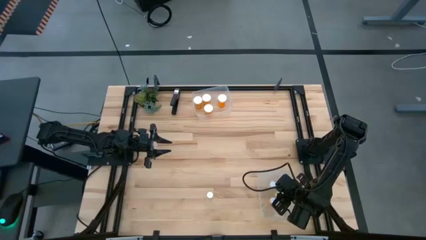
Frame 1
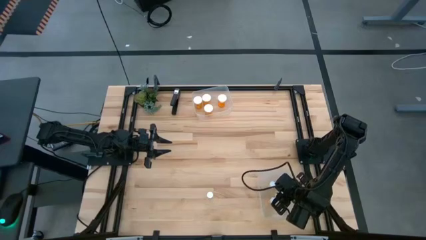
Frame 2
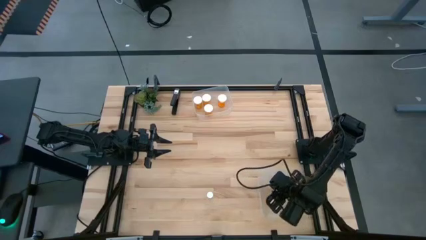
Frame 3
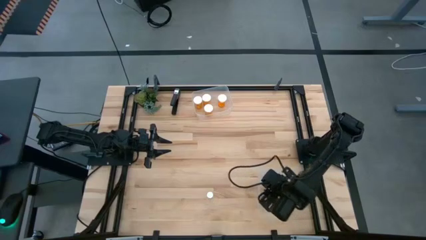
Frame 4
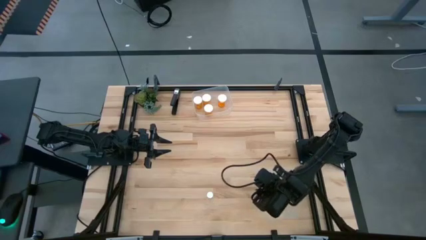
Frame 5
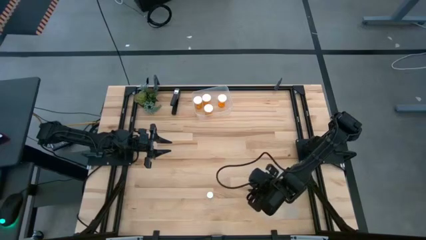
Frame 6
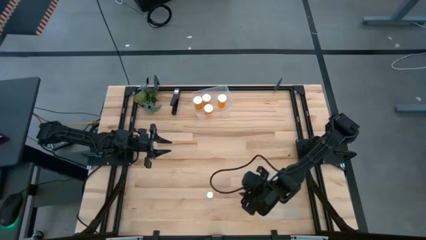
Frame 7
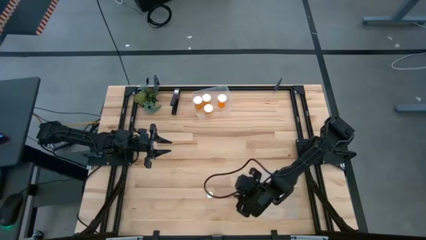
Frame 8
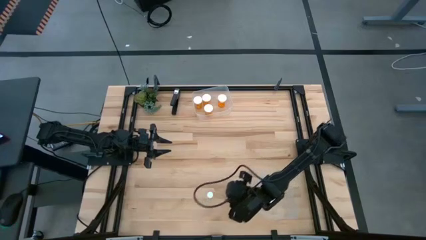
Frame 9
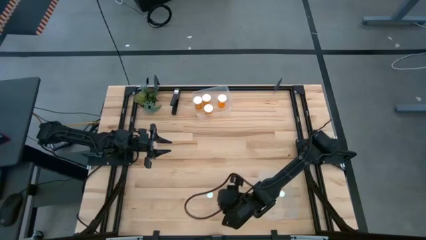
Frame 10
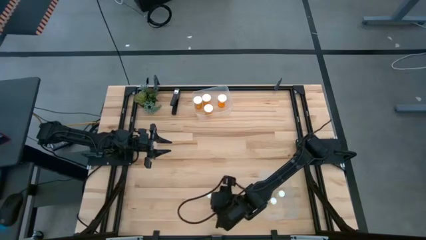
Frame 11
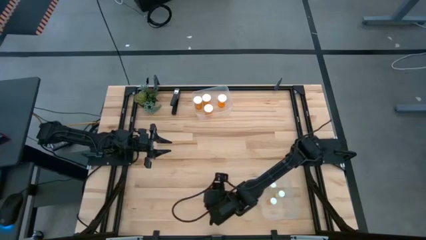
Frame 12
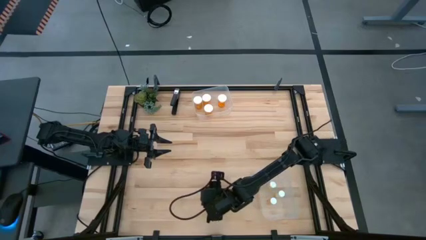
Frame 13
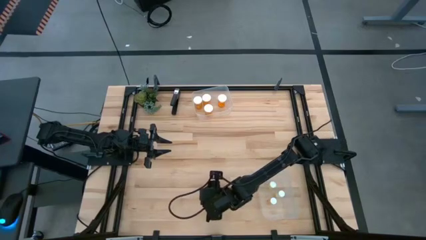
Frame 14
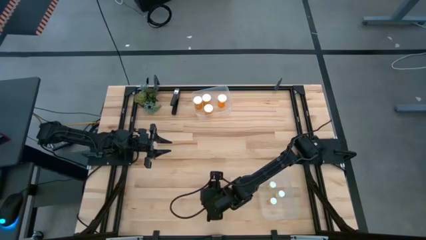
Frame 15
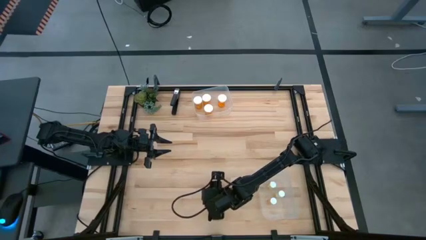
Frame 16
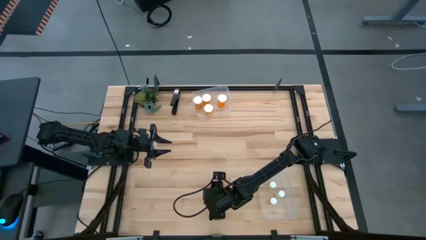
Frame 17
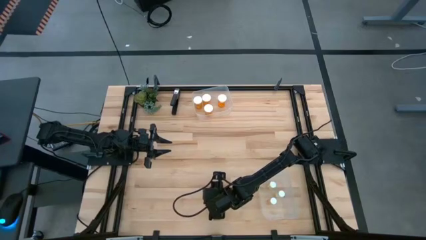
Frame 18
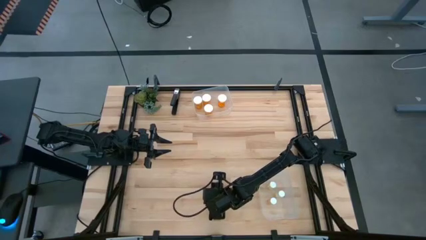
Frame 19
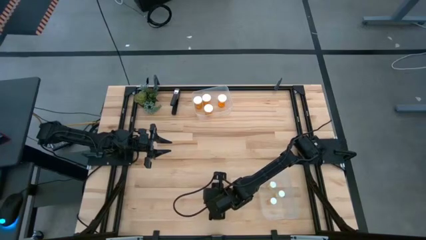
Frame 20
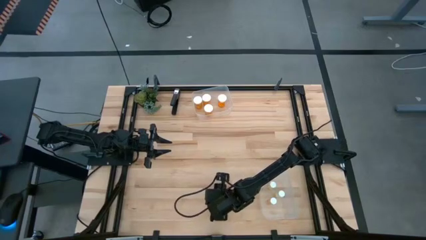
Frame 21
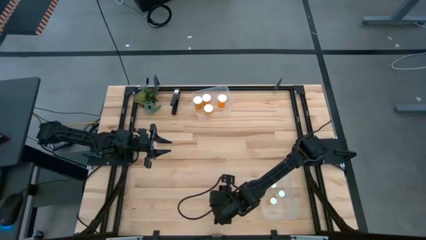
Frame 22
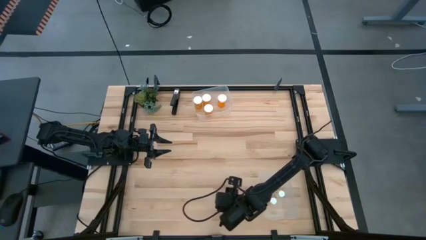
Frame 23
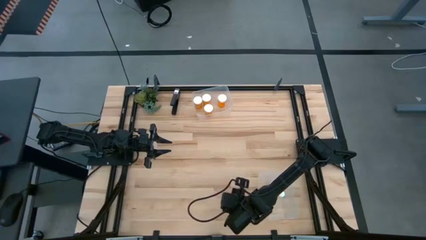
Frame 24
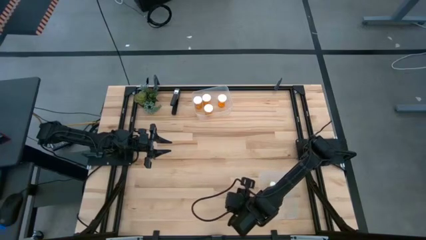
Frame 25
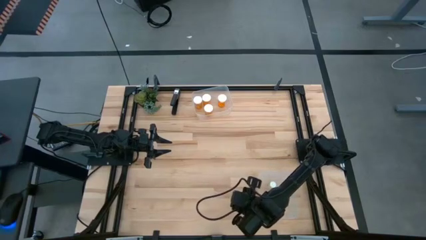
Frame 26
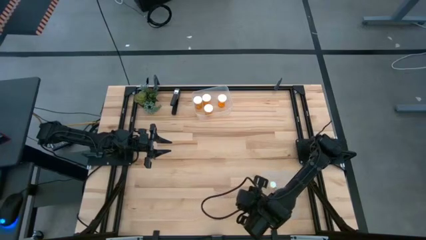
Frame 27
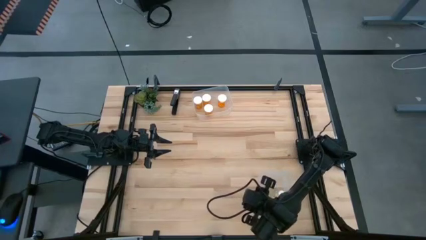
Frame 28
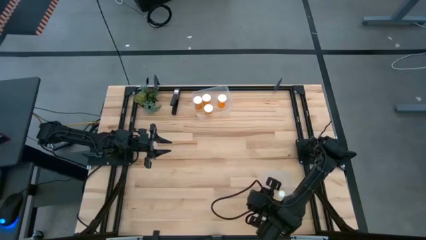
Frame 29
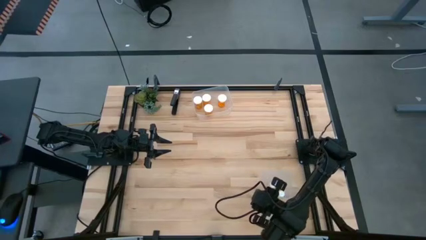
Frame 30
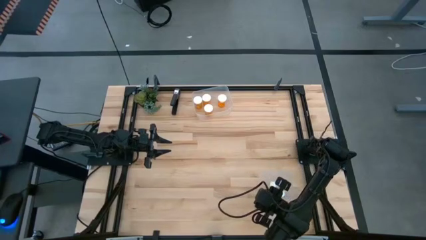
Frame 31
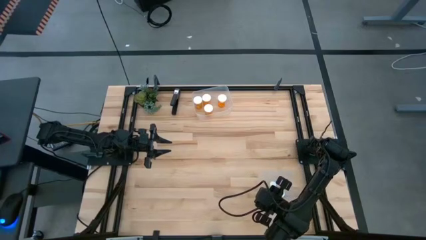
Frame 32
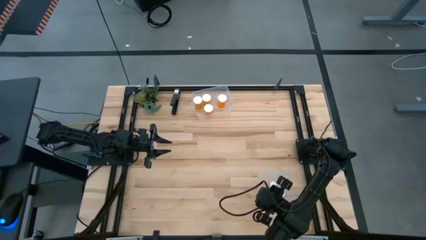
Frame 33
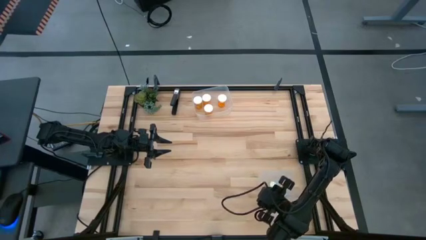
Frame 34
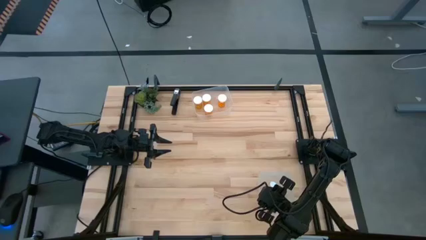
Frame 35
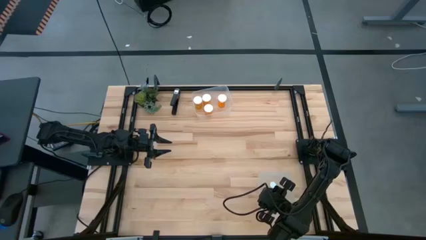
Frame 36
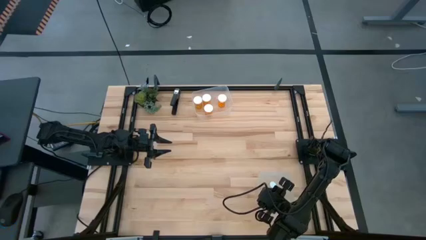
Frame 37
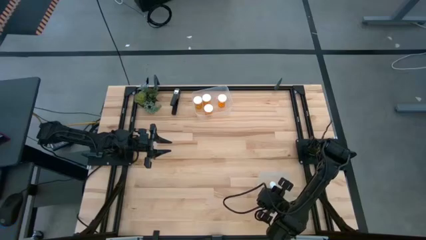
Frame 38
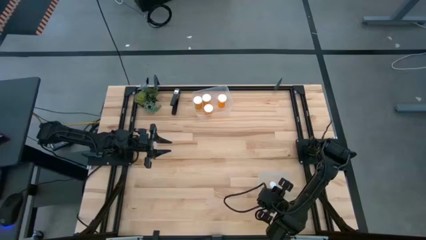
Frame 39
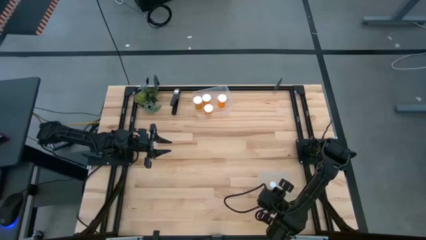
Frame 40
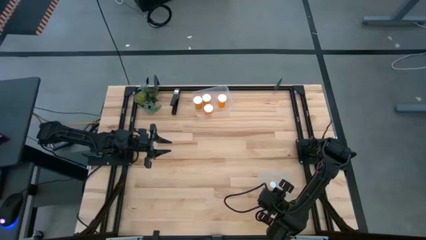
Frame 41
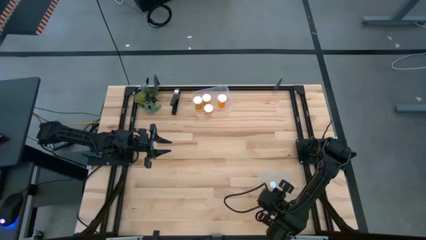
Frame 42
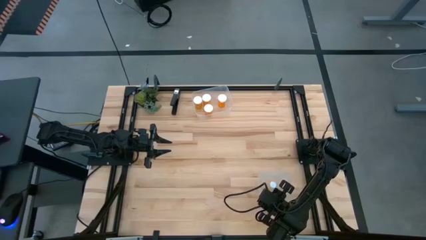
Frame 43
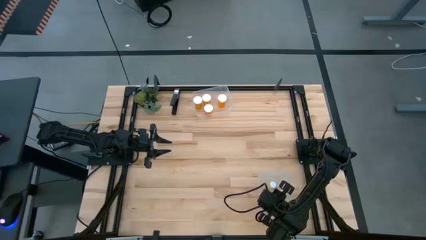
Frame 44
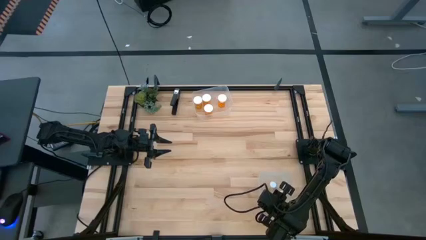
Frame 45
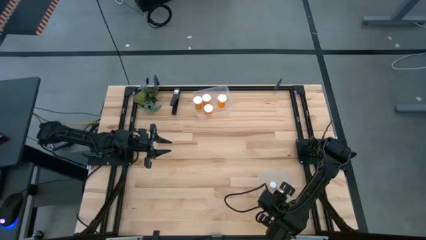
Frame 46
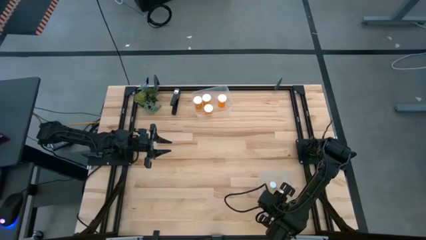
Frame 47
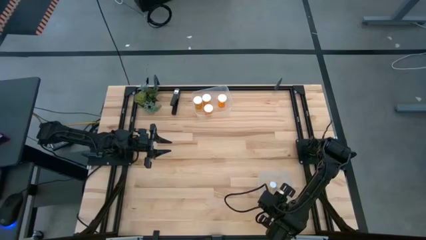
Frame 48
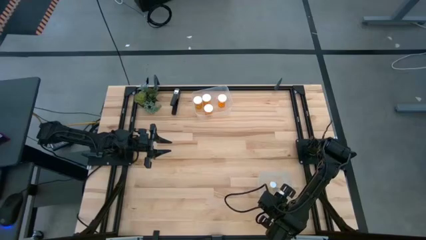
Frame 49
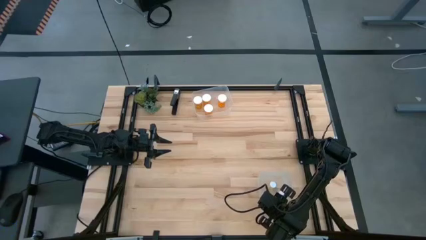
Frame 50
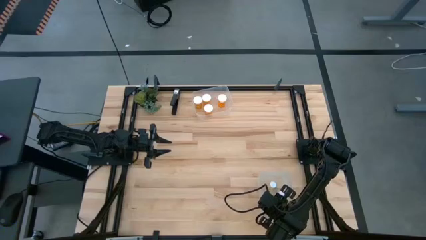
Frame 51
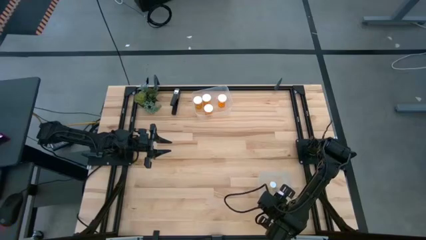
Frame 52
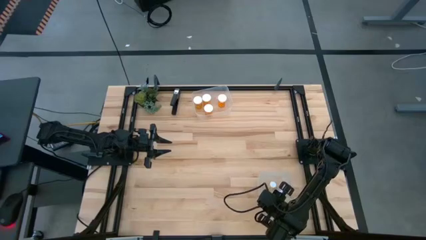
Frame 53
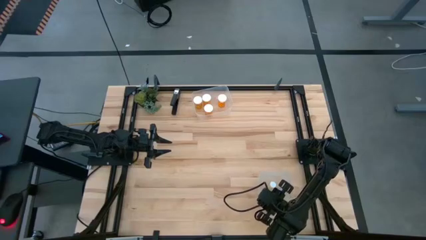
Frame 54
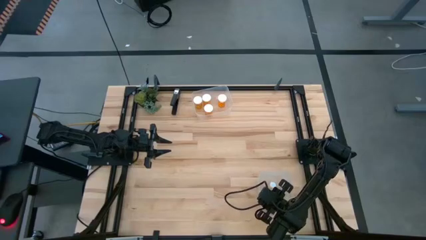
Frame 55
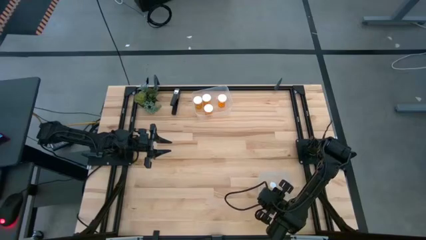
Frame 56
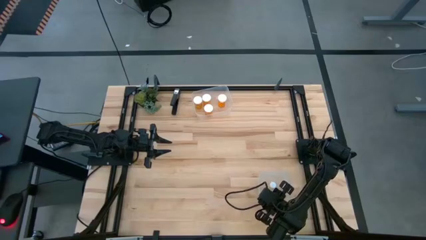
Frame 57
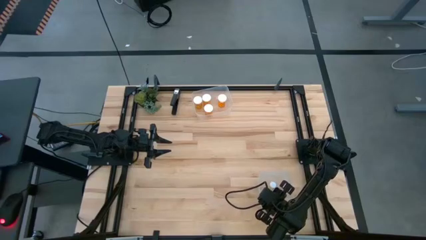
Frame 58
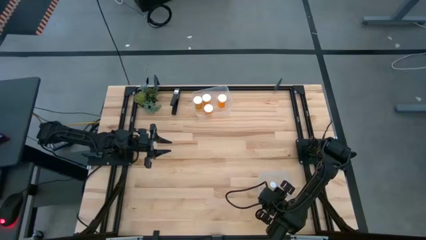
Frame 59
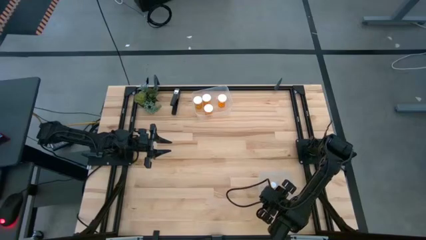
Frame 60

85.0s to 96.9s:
Task: Pick and place medicine bottles into bin by pill shape (circle, oval)
Put the small transparent pill bottle into the bottom transparent bin
